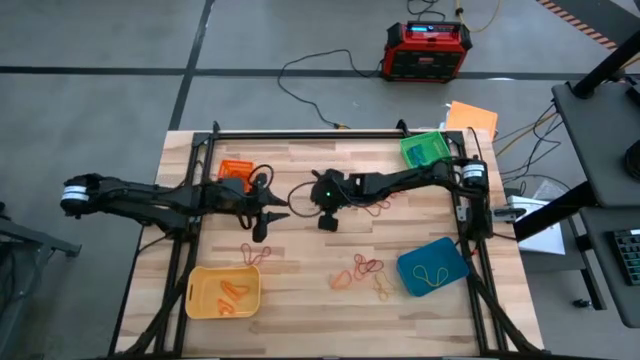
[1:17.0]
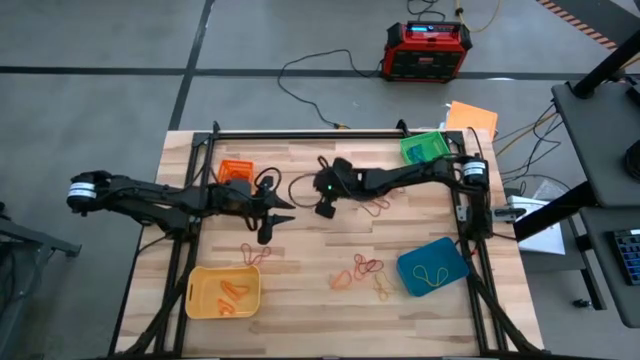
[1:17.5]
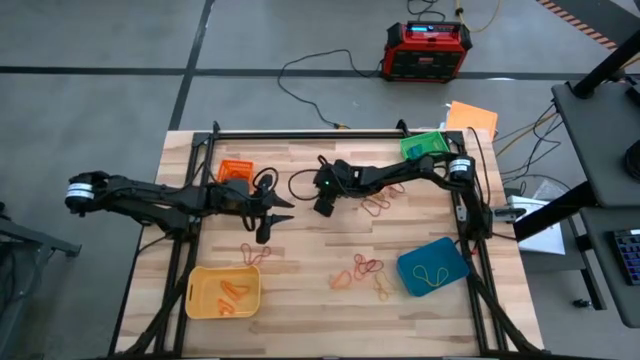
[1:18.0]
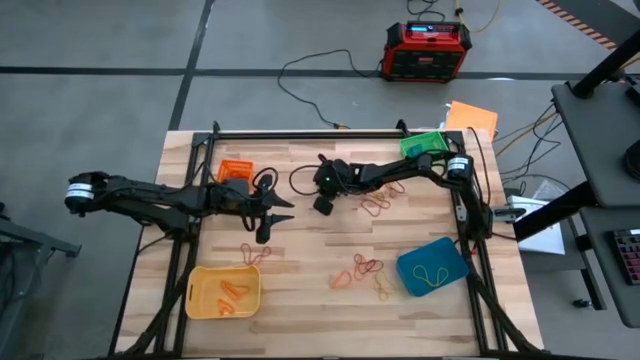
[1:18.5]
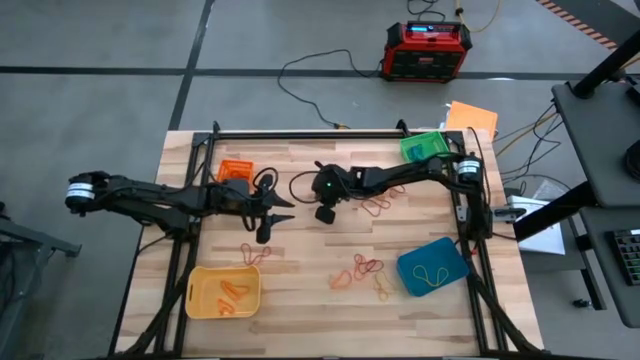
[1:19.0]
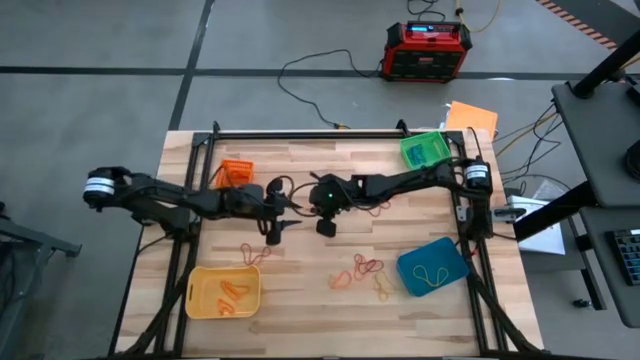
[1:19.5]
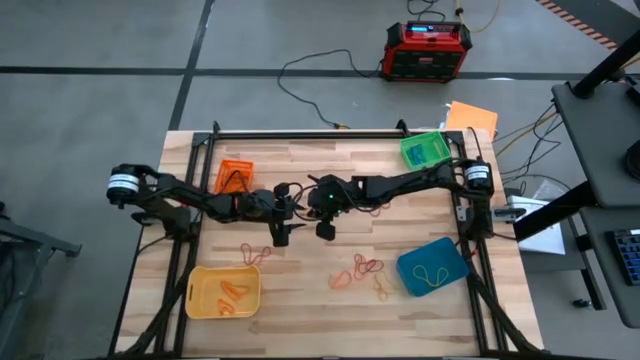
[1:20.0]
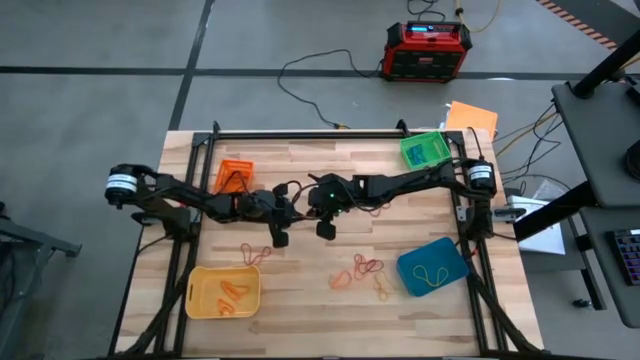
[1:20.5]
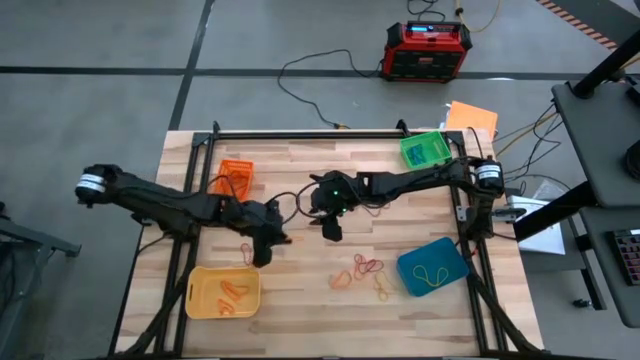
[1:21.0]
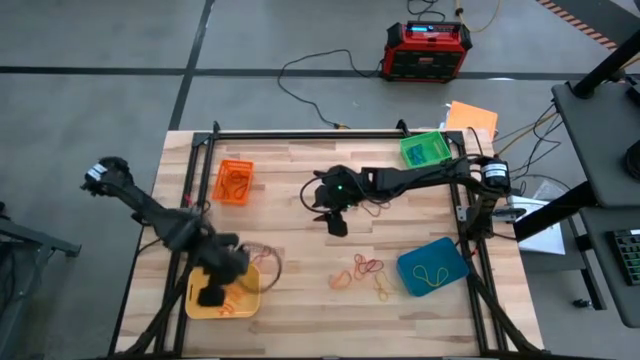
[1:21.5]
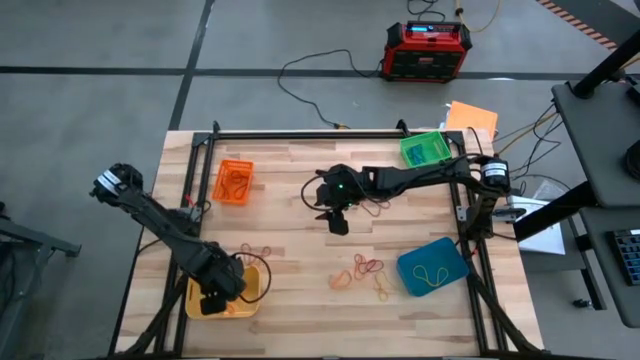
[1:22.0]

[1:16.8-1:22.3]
Task: Sort rubber bands into baskets
Put the orange rubber band into the yellow bin

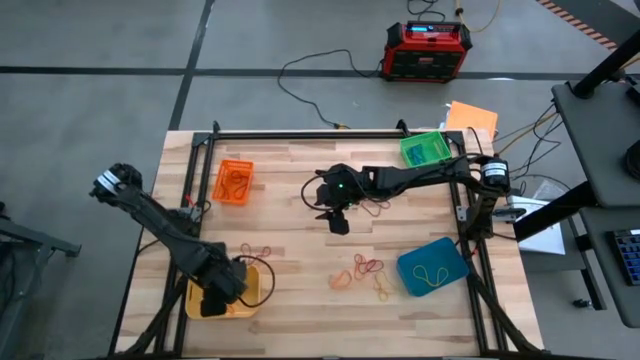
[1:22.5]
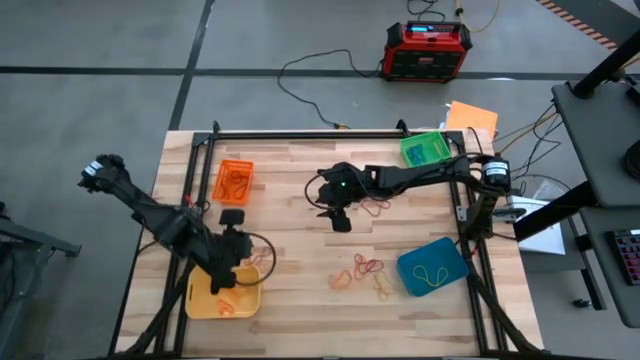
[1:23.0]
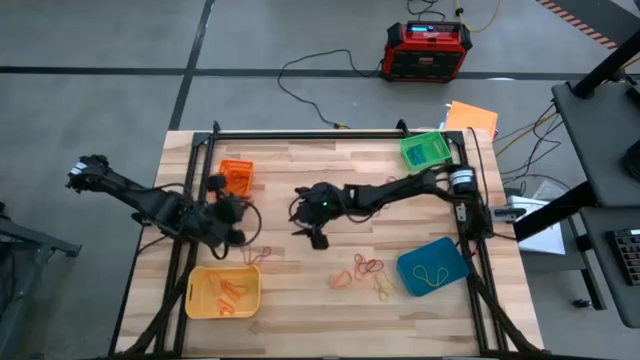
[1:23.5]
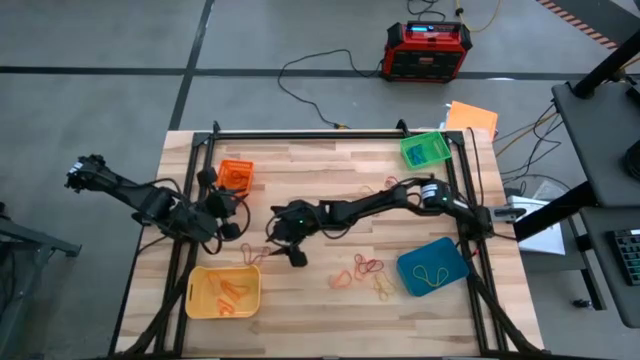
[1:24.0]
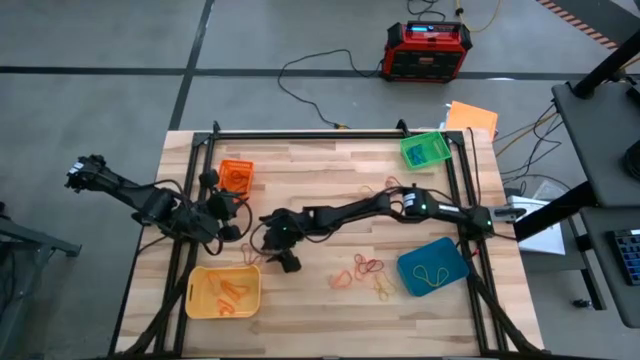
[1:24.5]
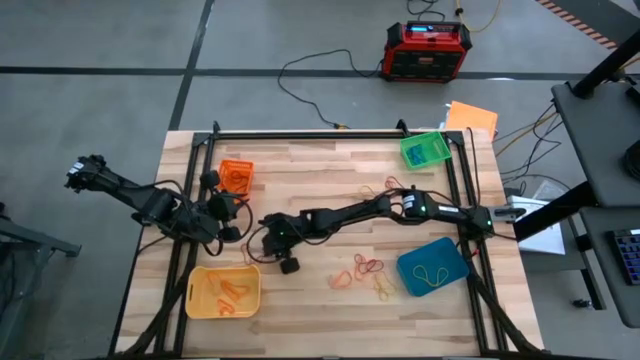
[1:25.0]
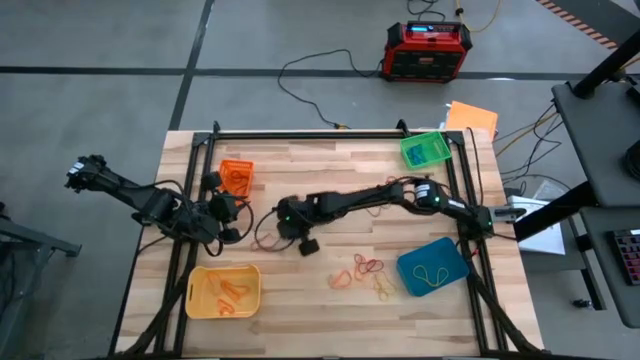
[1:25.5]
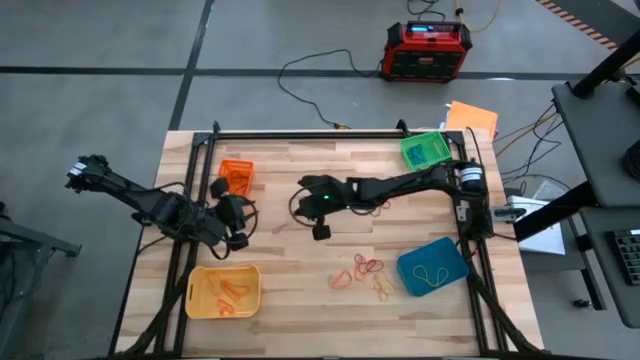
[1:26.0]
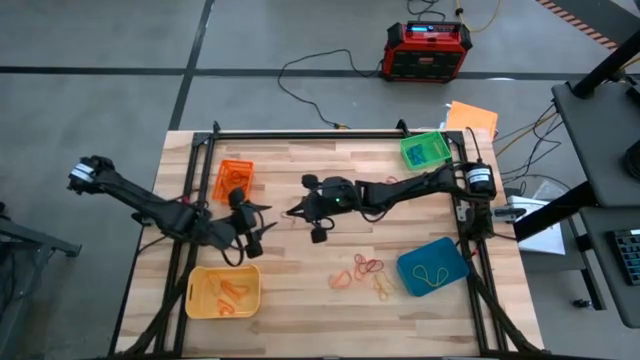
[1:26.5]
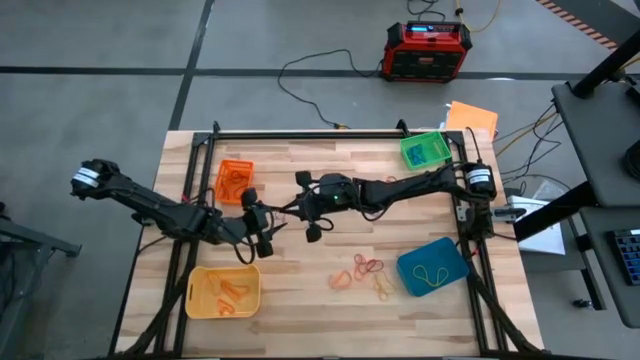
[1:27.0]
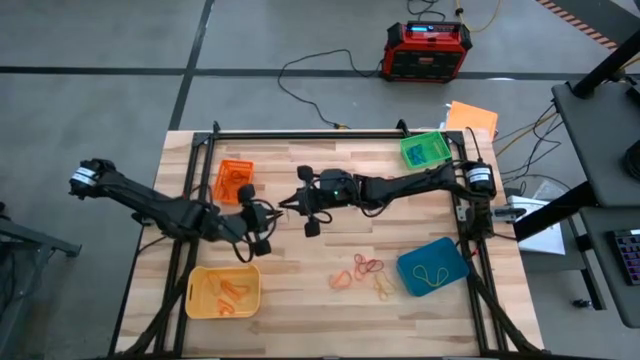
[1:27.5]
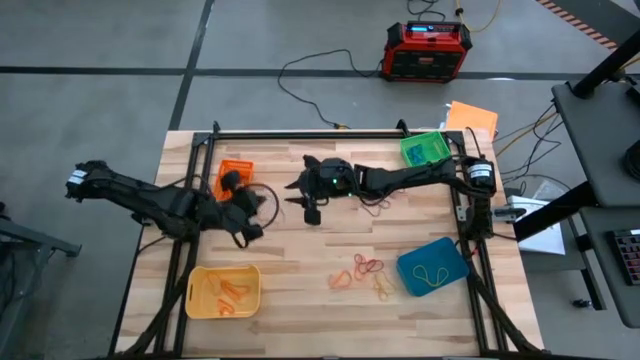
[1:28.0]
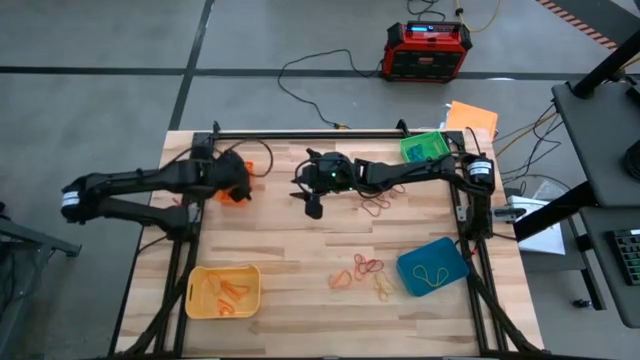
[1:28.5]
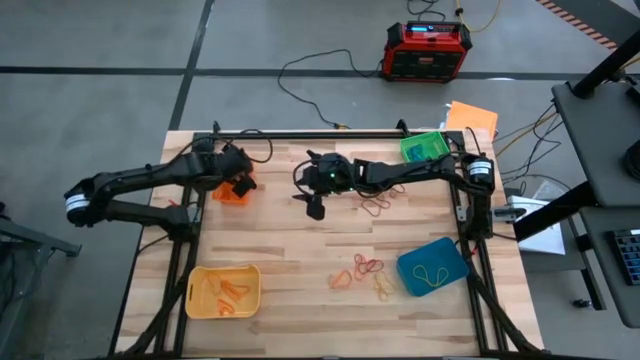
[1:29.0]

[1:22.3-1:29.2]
Put the red rubber band into the orange bin

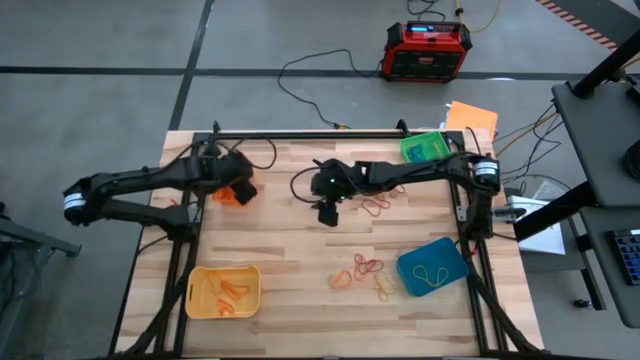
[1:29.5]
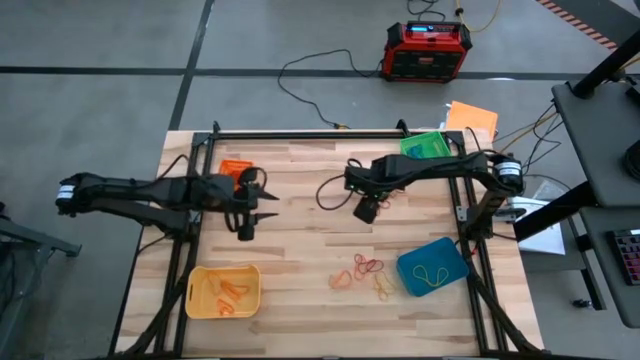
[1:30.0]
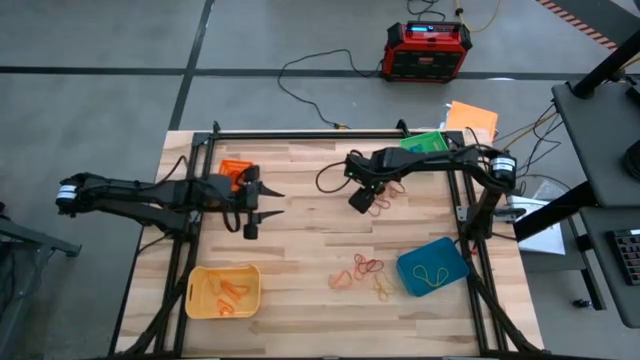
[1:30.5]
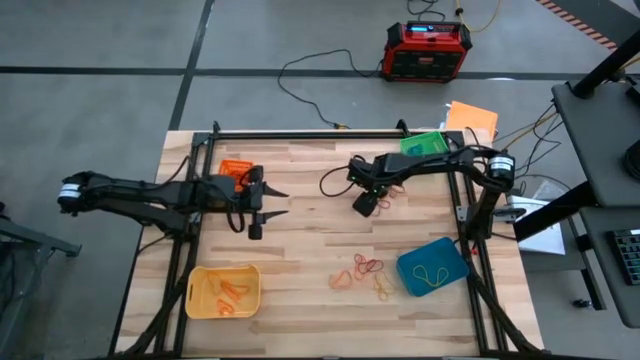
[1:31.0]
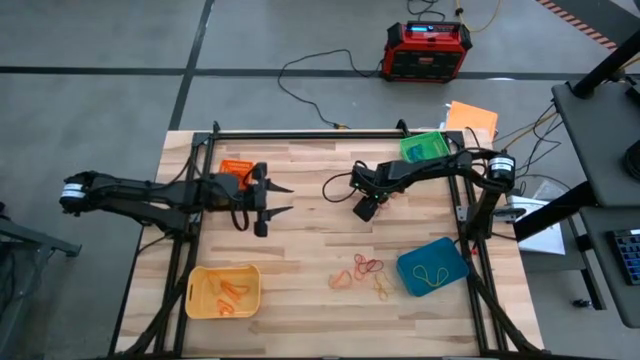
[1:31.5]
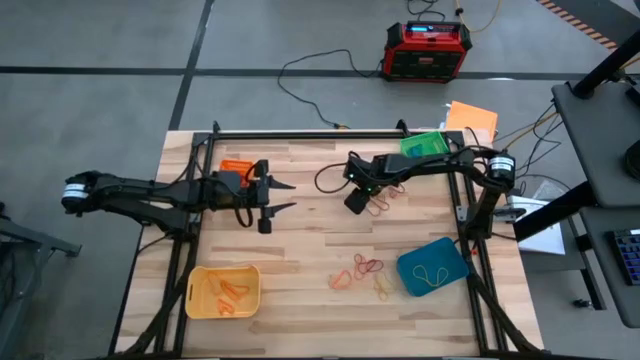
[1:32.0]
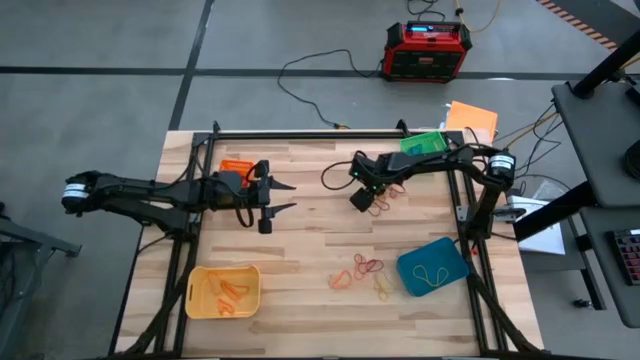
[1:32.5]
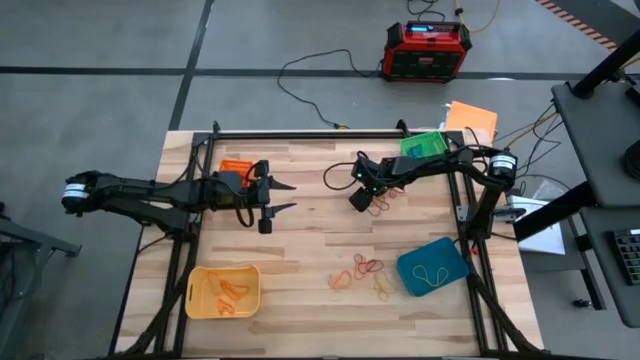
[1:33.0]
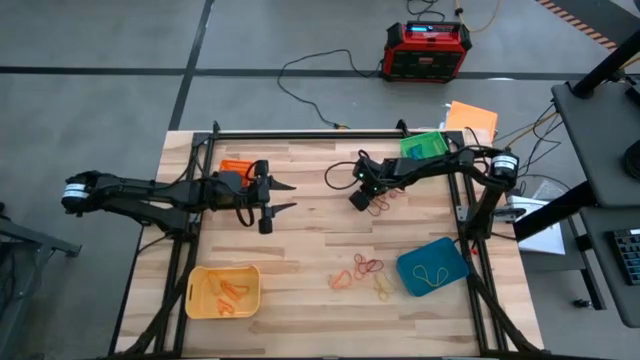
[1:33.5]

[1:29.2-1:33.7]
Put the yellow rubber band into the blue bin

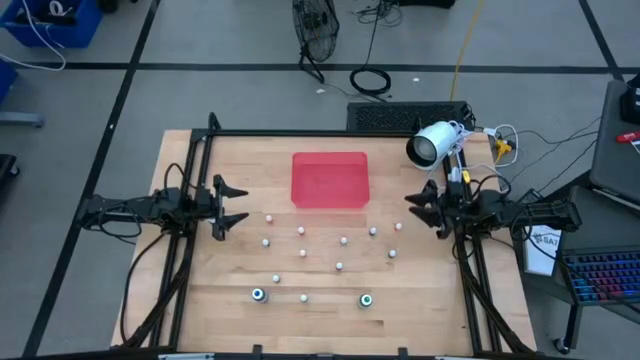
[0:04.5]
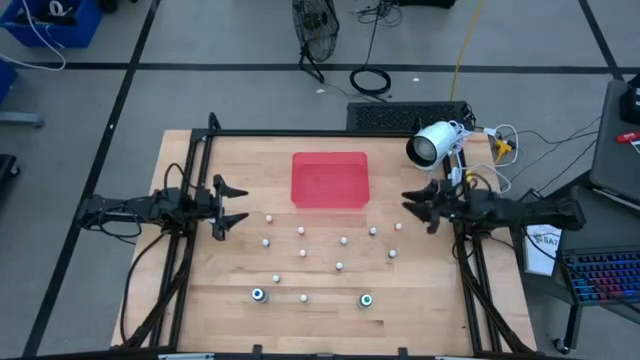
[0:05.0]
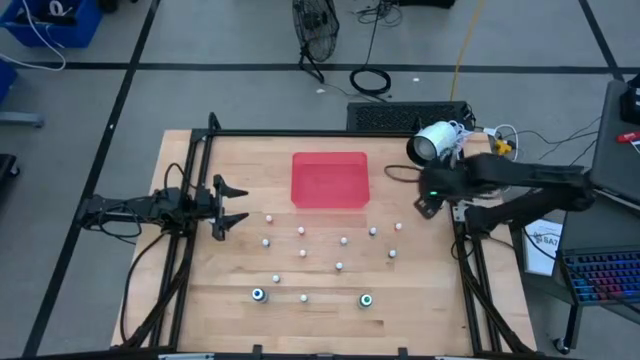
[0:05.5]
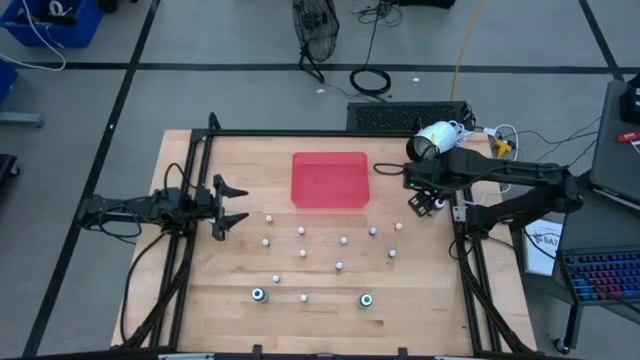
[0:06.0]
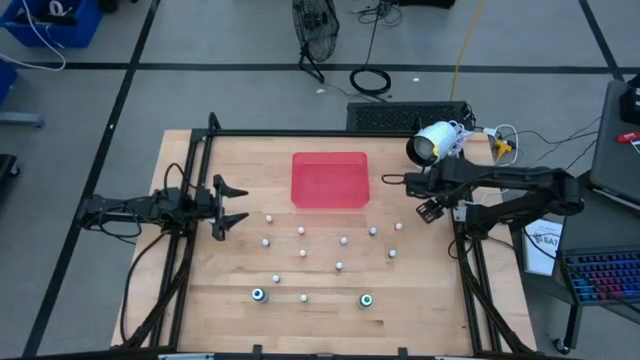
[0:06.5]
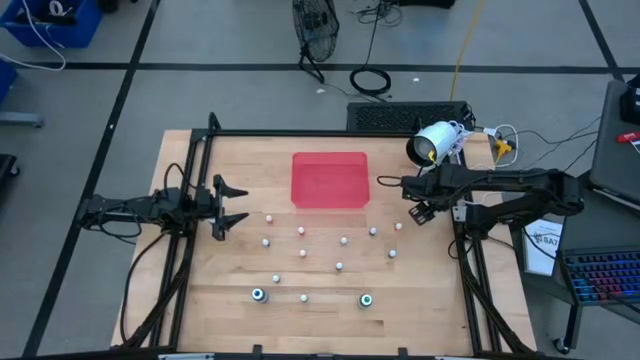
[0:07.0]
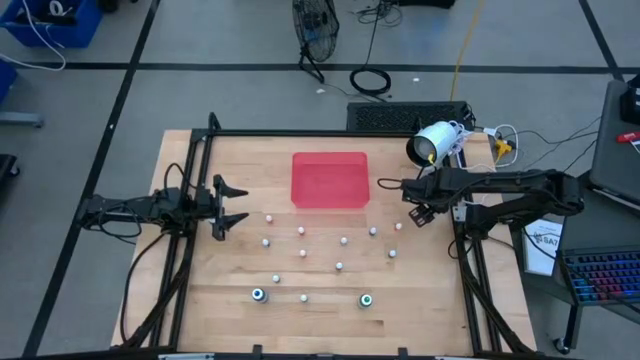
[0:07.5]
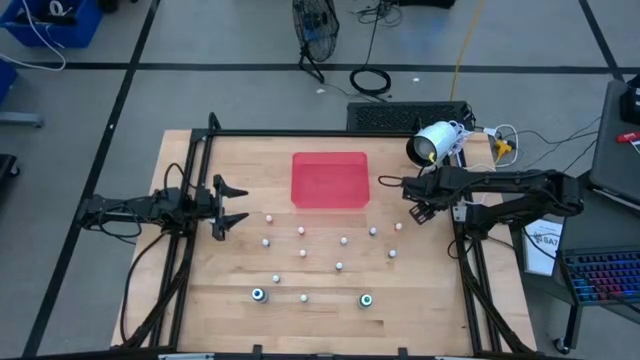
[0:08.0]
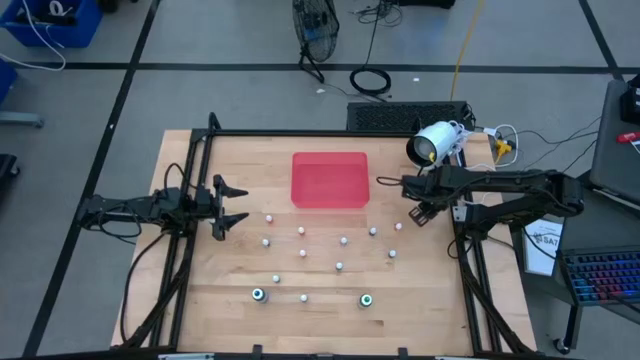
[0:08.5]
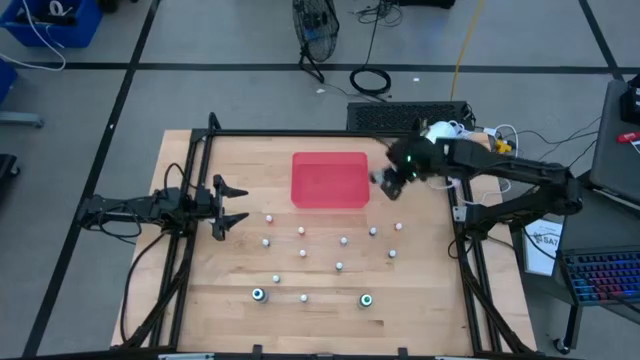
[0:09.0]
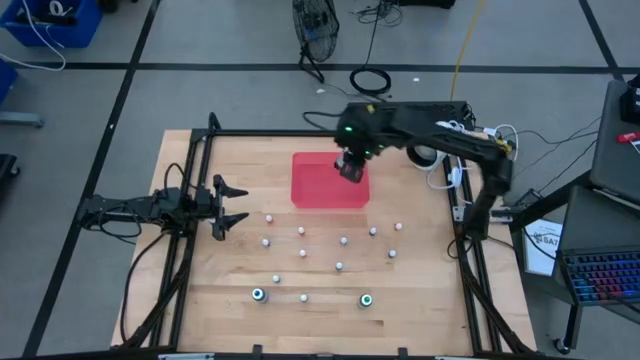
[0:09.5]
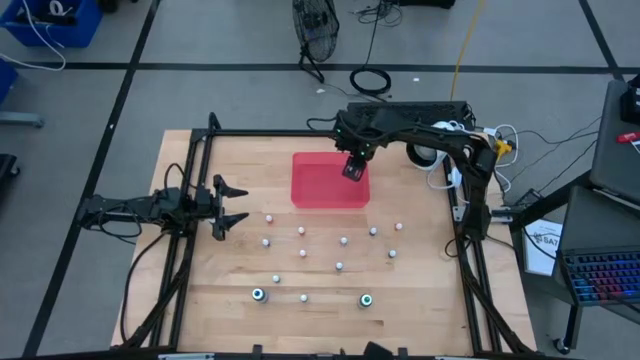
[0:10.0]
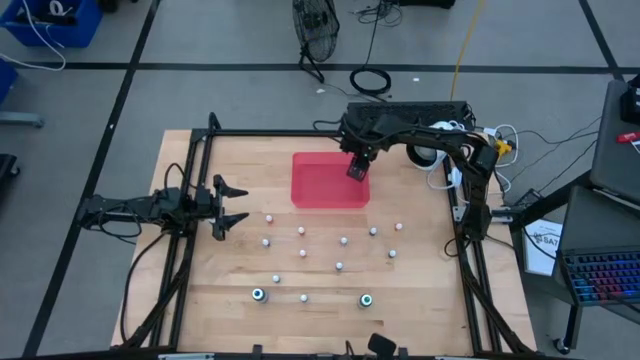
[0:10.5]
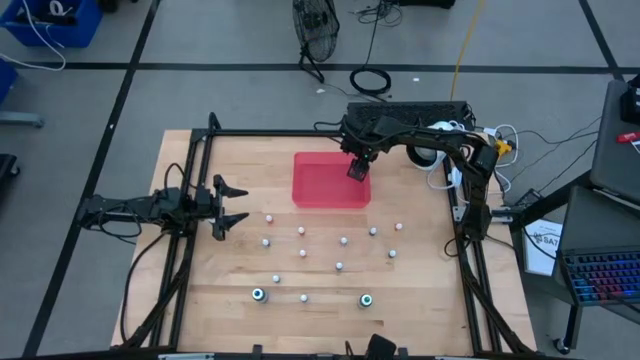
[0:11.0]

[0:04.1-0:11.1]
Task: Pick & Place food coloring
Put the large black food coloring bottle into the bin
